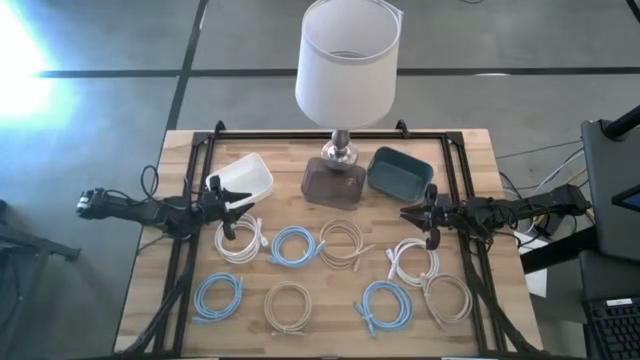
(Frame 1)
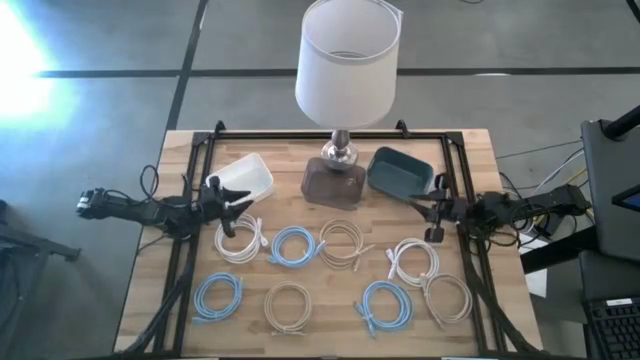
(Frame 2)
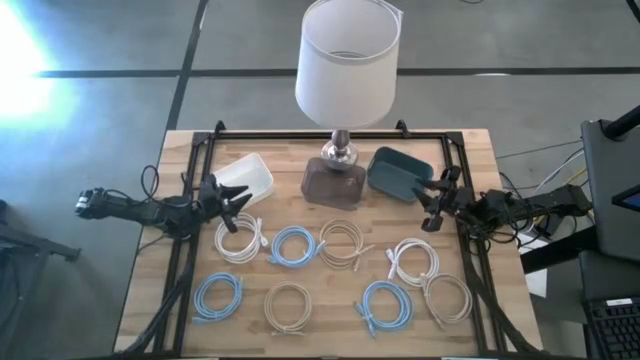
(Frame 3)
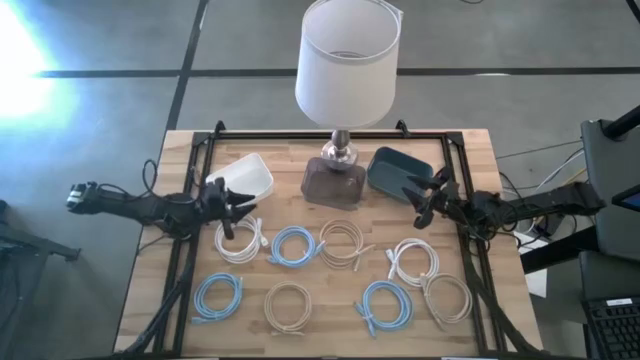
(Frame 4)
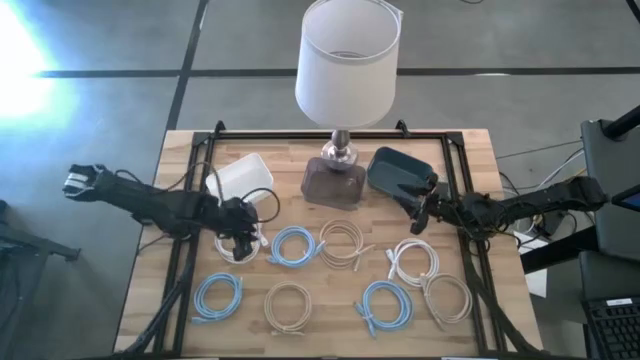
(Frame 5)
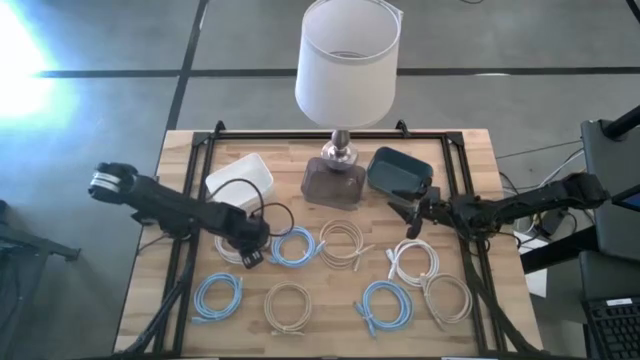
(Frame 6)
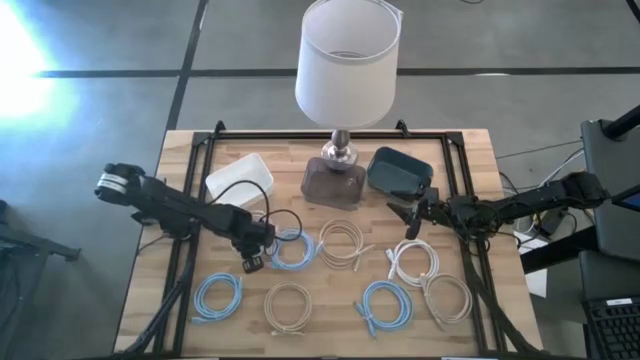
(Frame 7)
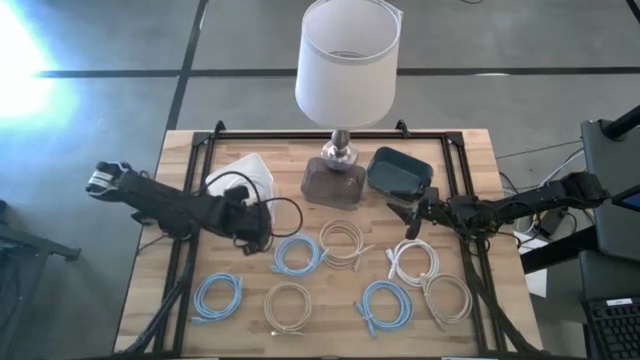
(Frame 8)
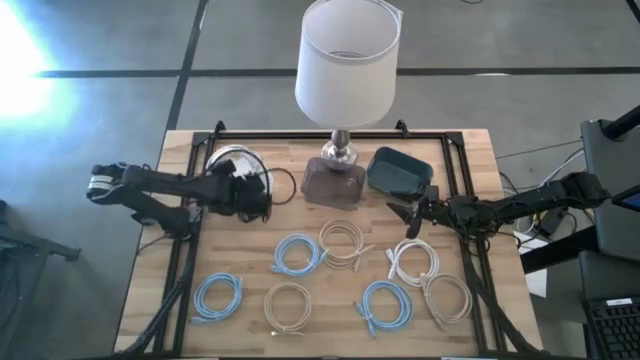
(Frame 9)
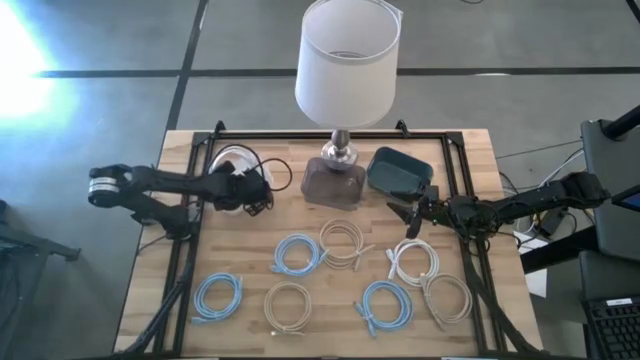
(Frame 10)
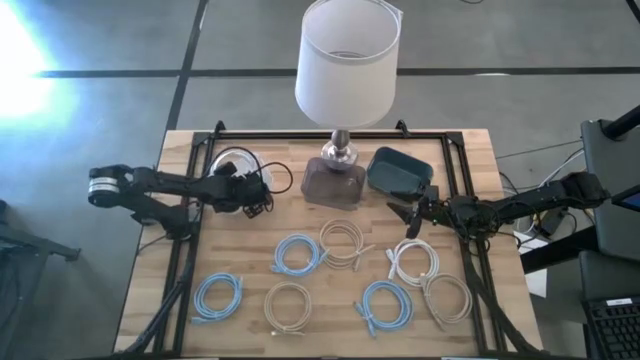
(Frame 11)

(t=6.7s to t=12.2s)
Task: Sort HDMI cables
Put the left white HDMI cable into the white bin

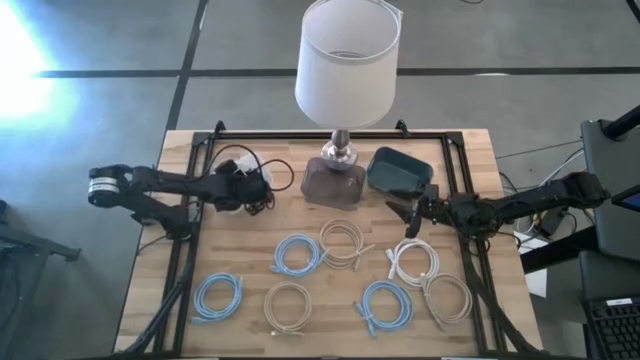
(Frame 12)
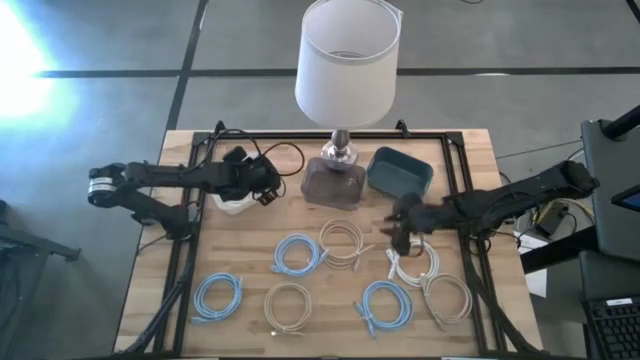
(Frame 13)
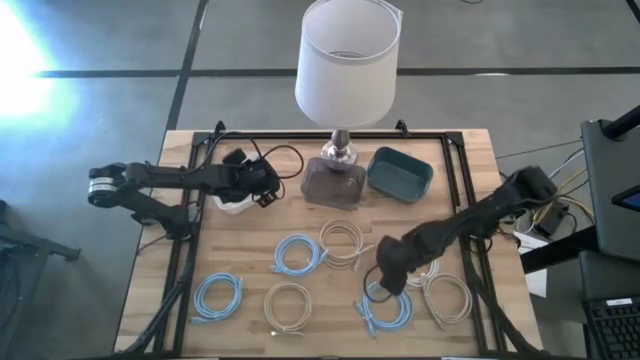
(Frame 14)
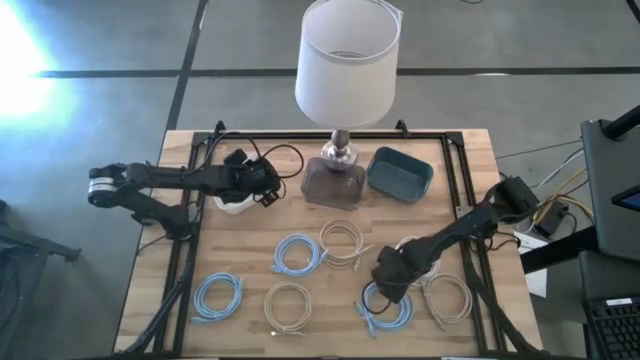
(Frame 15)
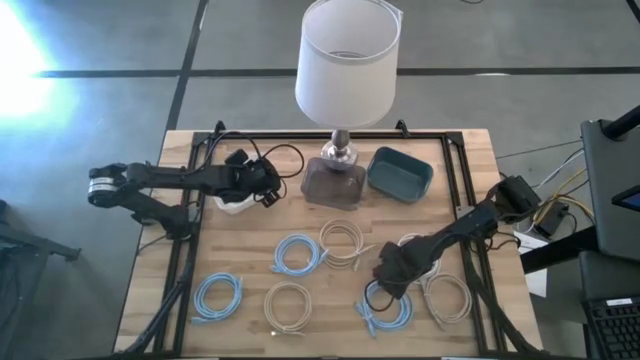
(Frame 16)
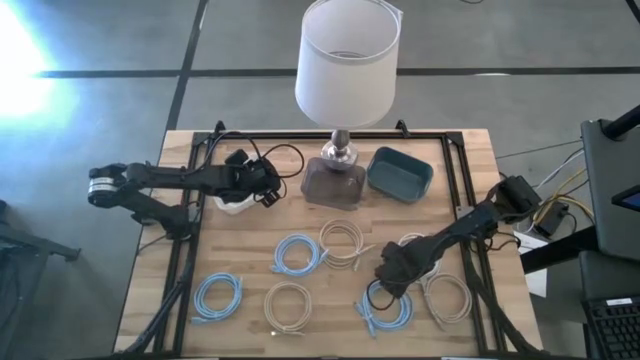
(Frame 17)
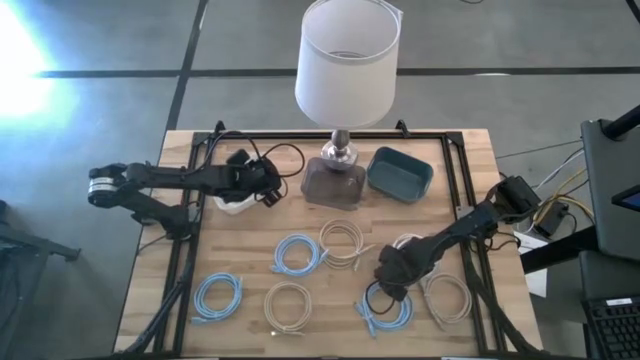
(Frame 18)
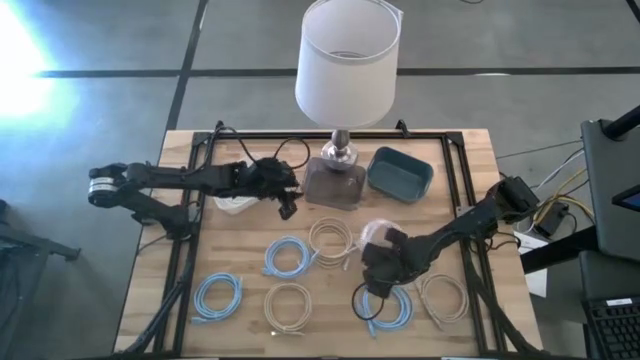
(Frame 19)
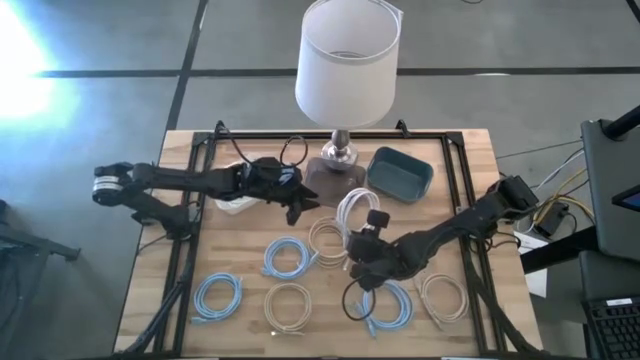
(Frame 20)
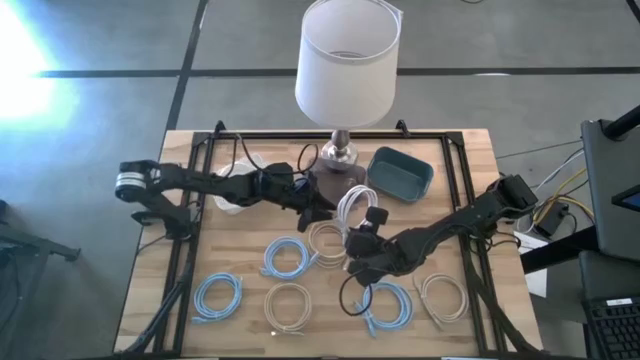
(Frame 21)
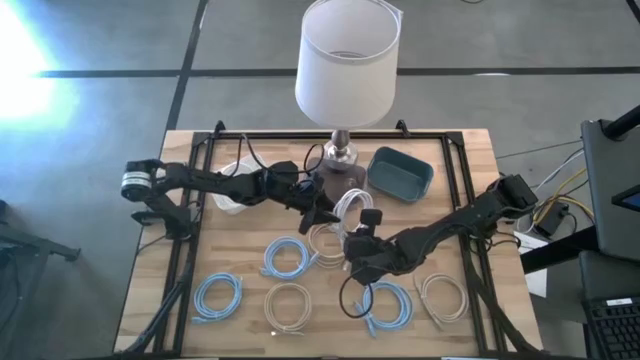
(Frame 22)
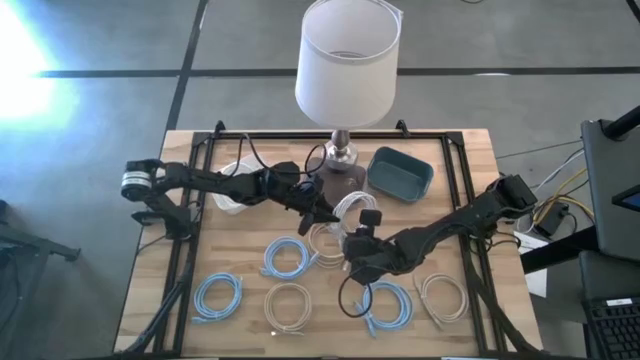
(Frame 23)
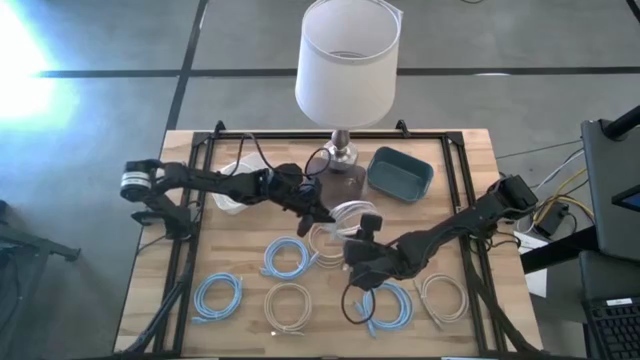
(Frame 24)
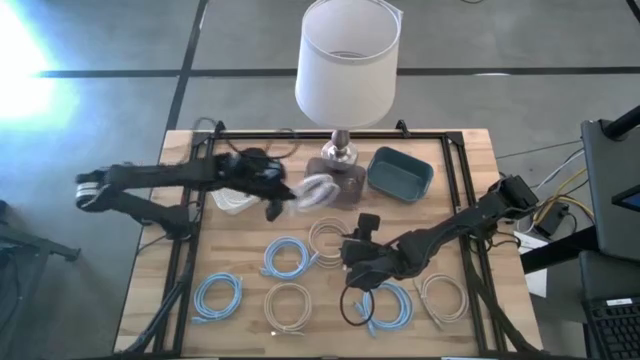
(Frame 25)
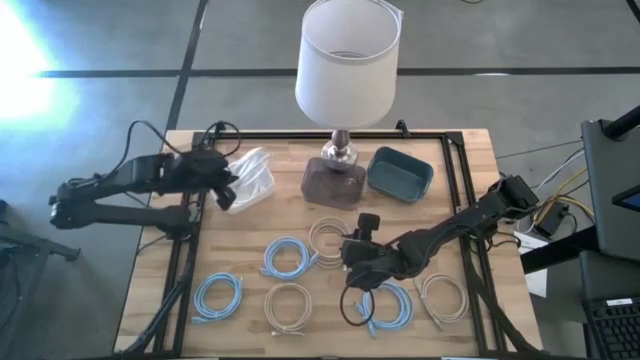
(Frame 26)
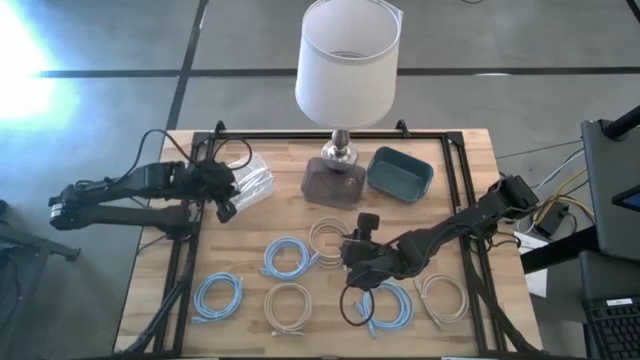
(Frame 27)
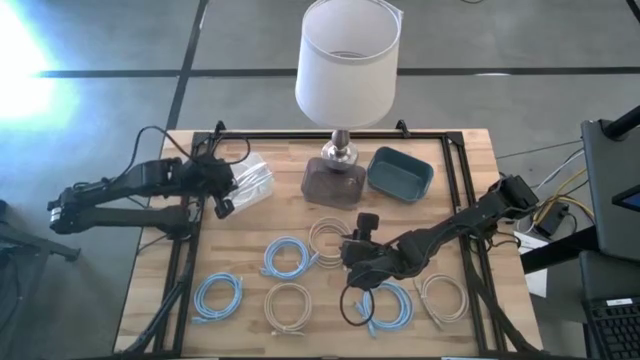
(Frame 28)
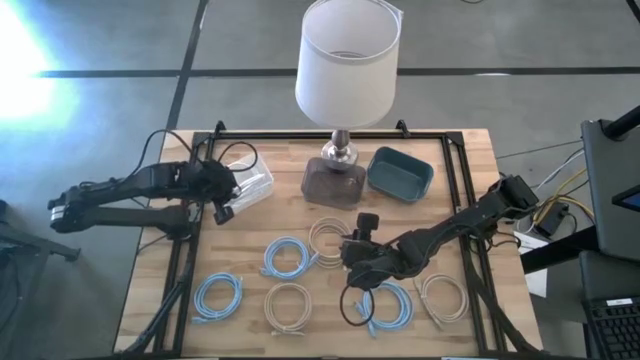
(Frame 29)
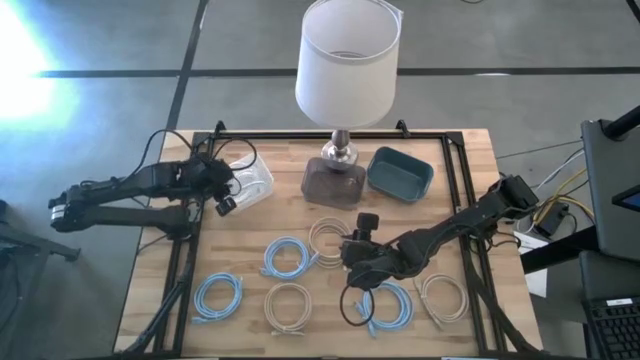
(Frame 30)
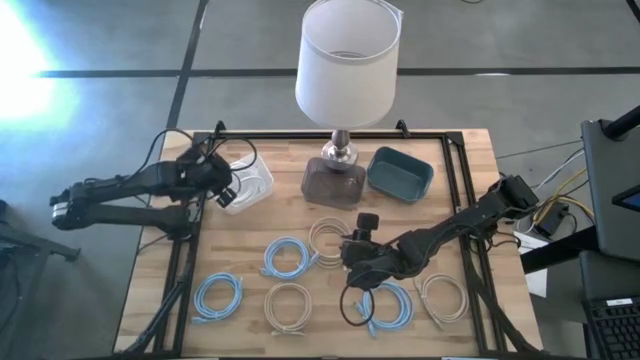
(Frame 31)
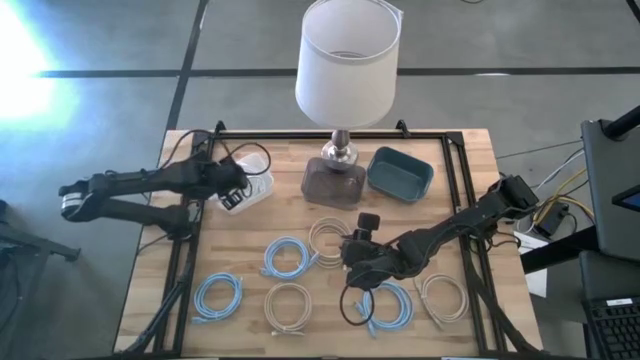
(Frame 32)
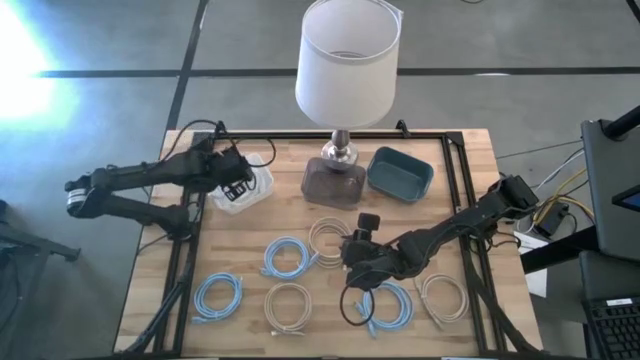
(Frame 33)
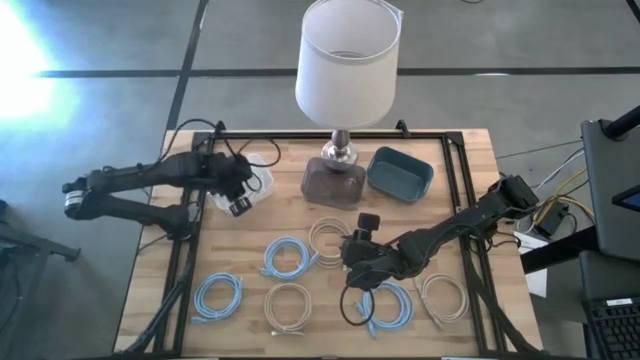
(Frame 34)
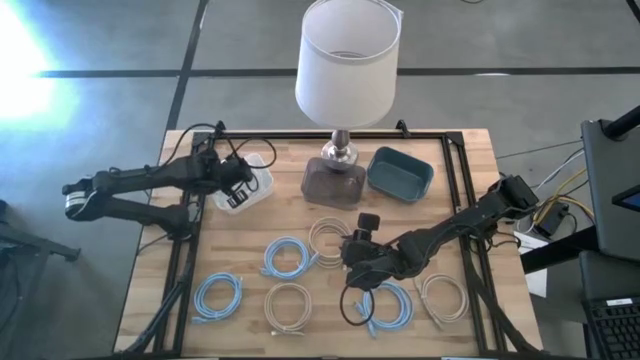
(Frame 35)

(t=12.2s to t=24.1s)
Put the white HDMI cable into the white bin

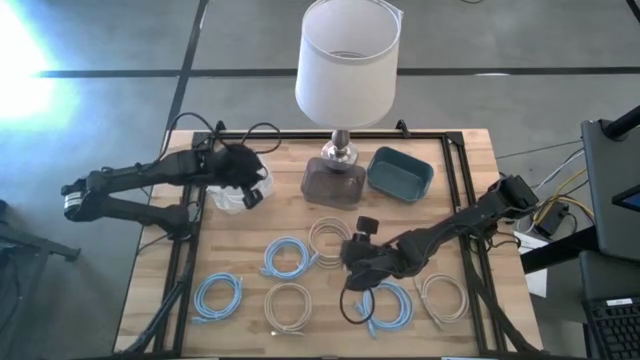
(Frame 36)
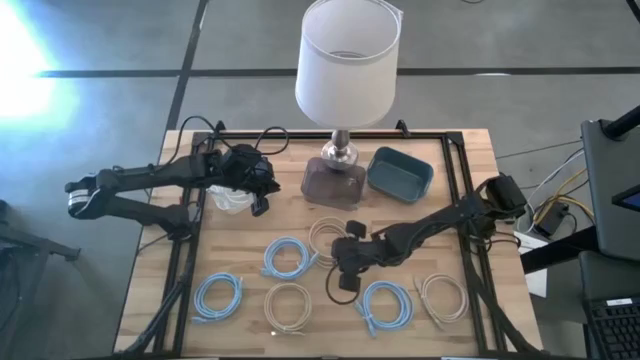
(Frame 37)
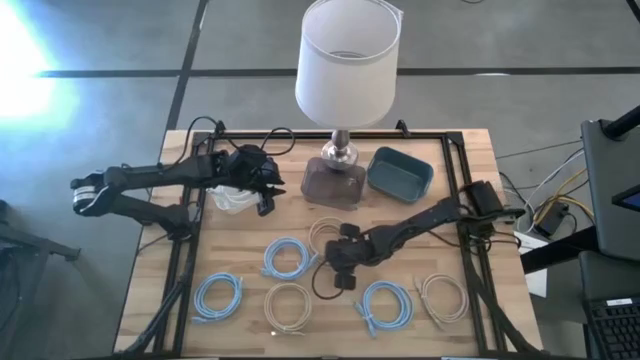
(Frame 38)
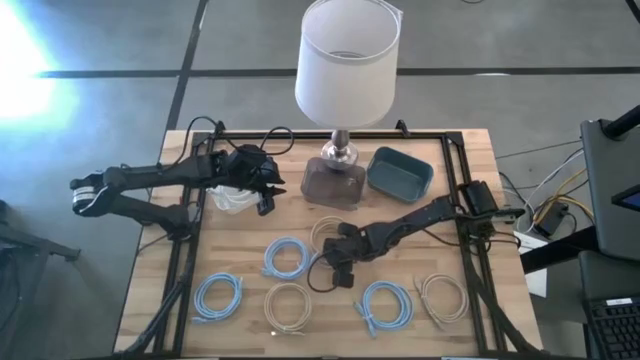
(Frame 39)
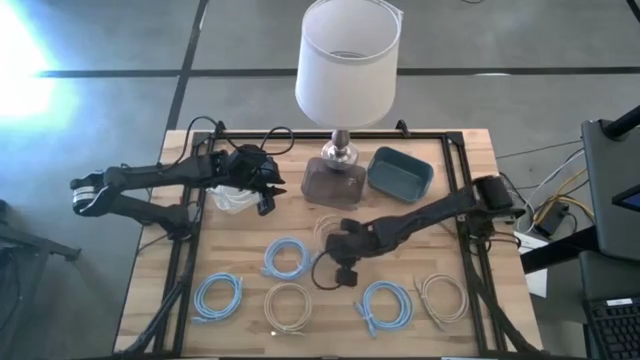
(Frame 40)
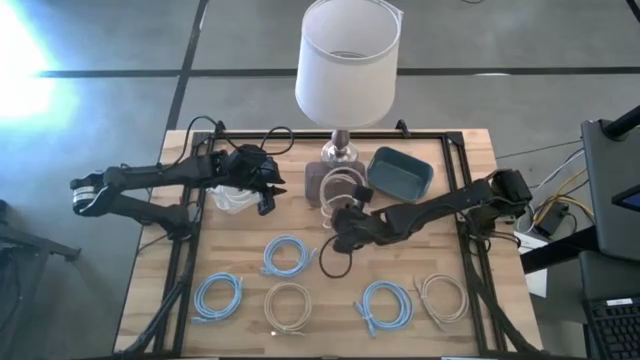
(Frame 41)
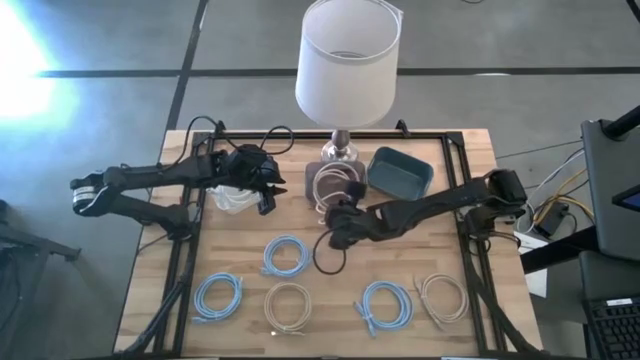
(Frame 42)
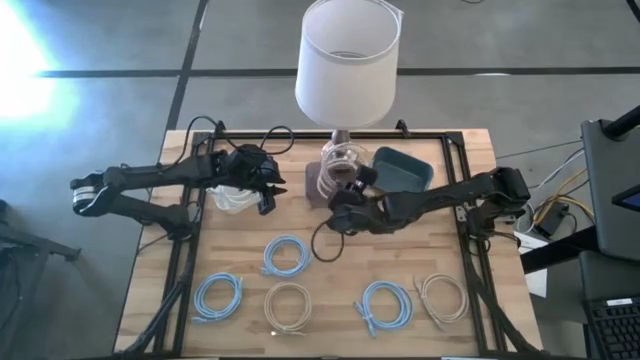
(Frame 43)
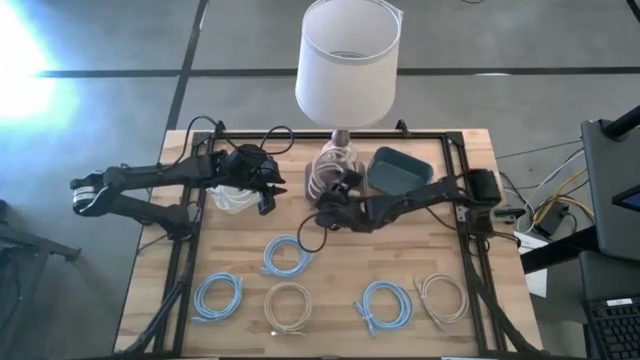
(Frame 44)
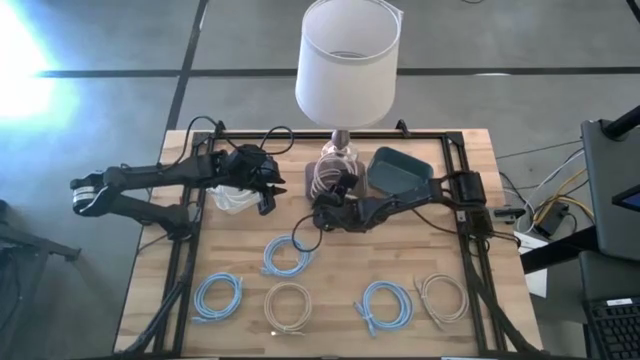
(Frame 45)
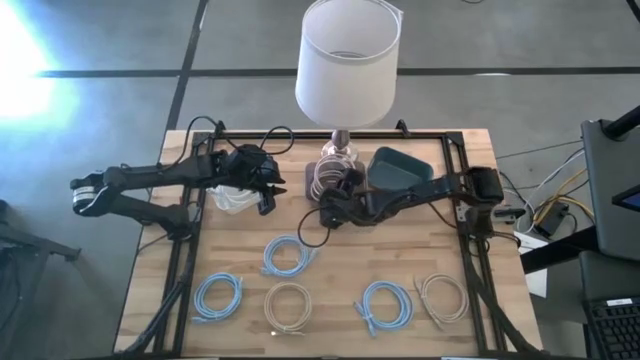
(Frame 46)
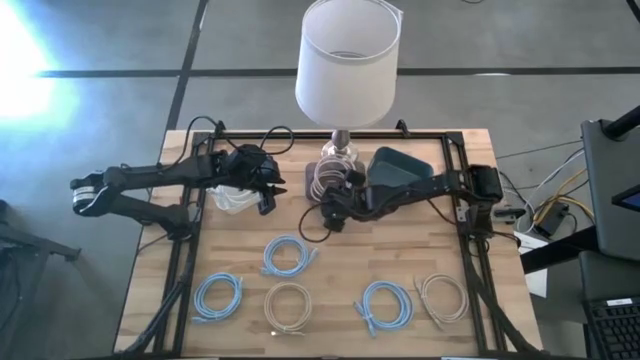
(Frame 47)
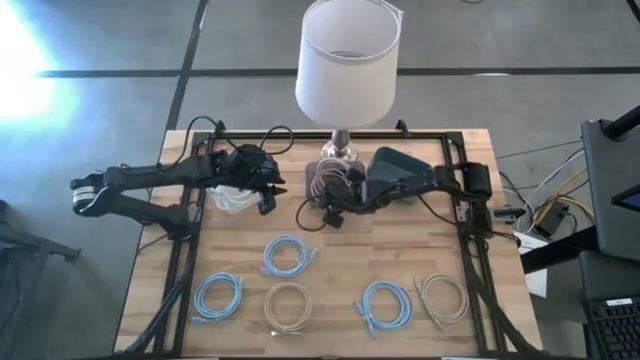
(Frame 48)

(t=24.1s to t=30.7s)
Put the top left brown HDMI cable into the black bin
